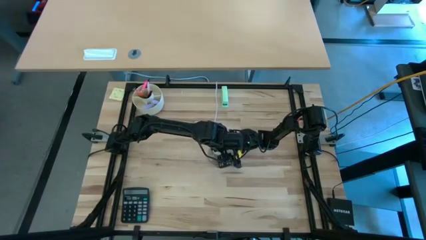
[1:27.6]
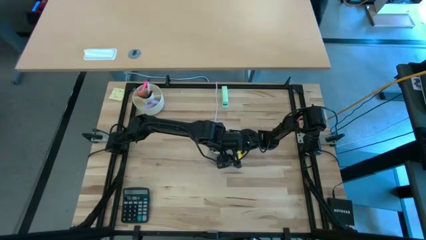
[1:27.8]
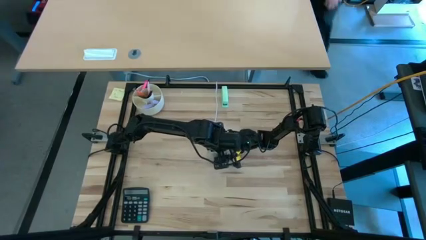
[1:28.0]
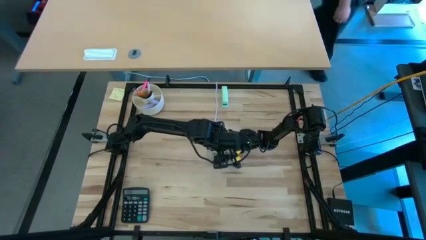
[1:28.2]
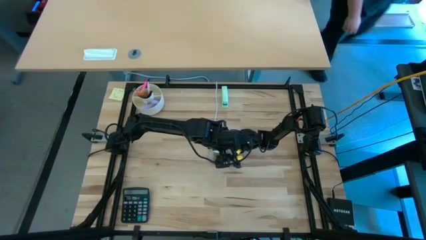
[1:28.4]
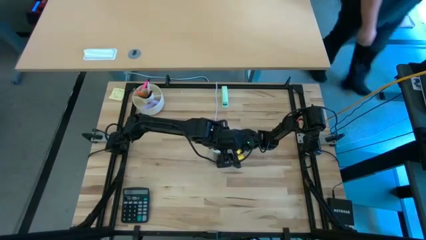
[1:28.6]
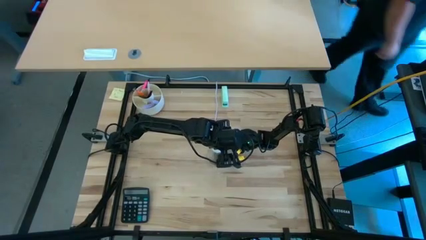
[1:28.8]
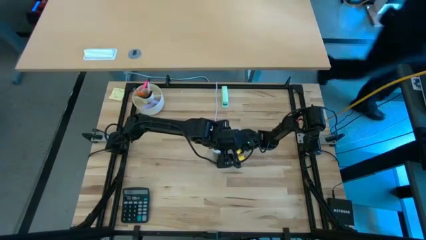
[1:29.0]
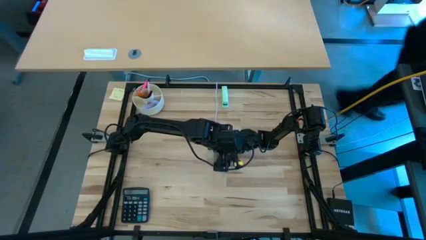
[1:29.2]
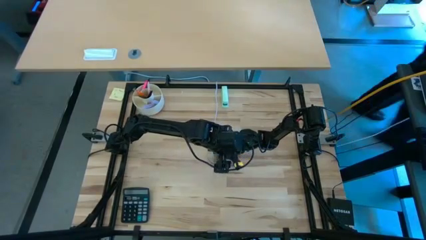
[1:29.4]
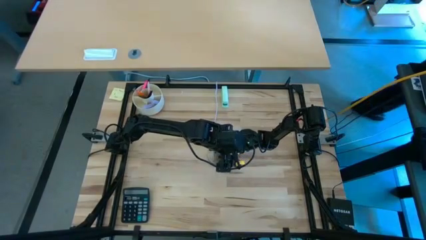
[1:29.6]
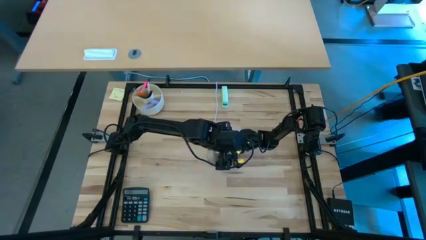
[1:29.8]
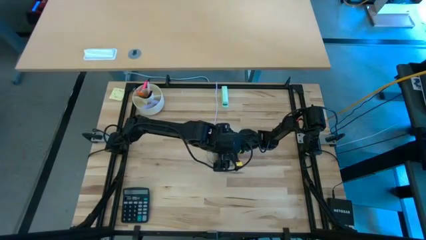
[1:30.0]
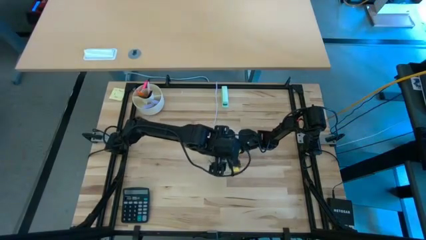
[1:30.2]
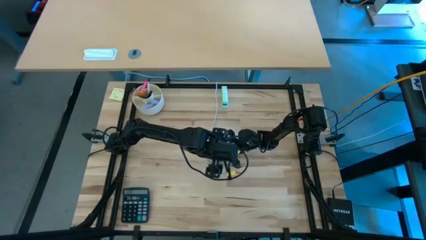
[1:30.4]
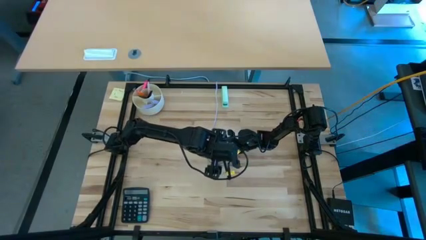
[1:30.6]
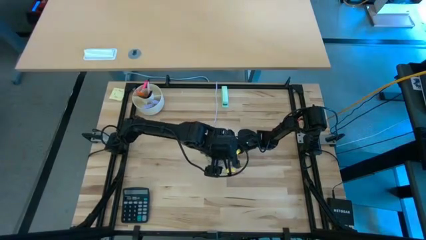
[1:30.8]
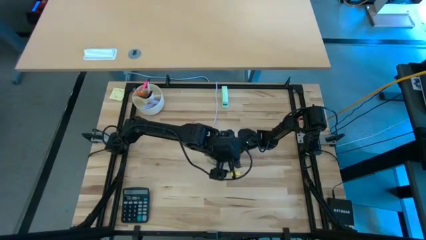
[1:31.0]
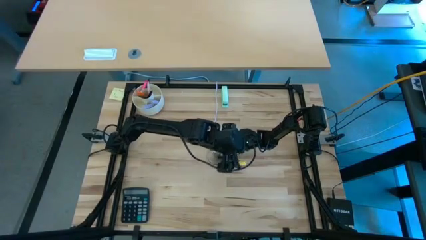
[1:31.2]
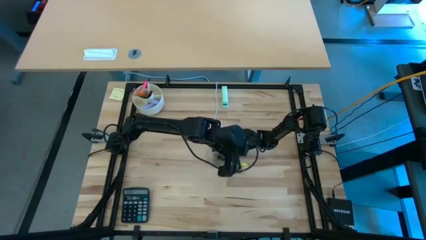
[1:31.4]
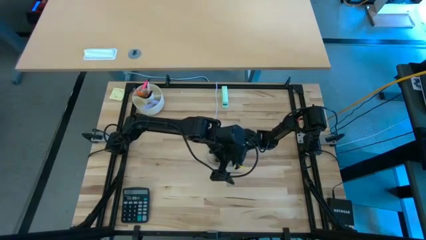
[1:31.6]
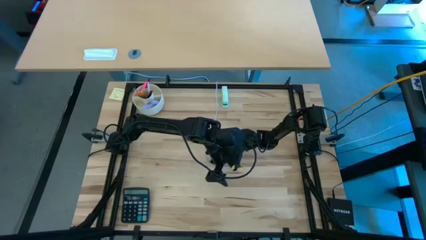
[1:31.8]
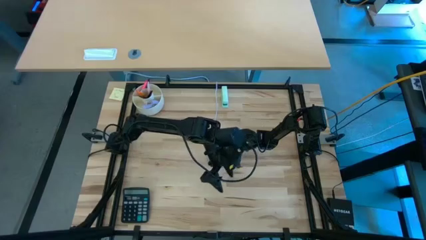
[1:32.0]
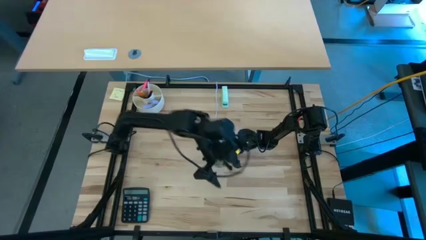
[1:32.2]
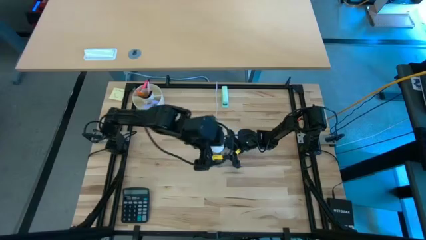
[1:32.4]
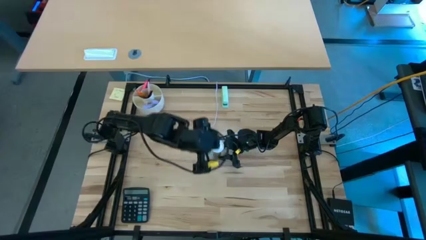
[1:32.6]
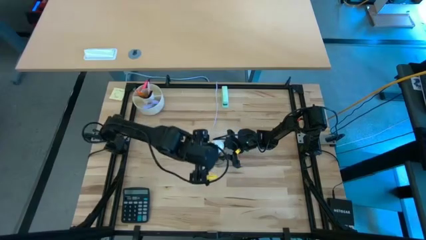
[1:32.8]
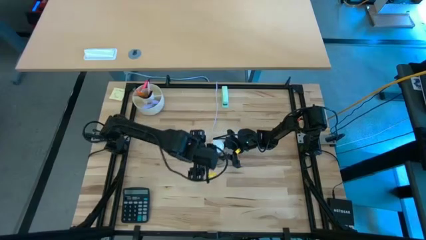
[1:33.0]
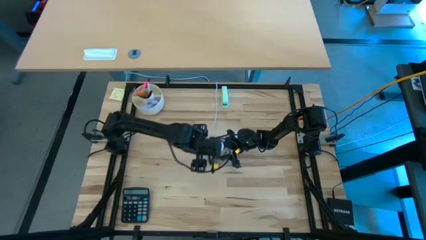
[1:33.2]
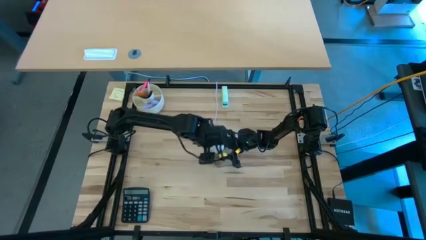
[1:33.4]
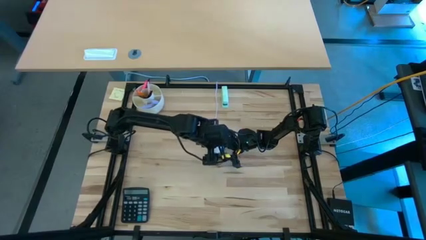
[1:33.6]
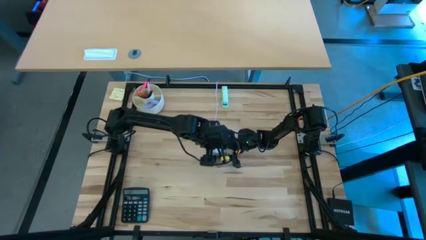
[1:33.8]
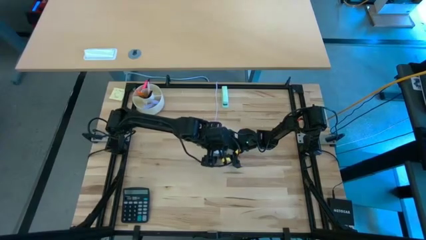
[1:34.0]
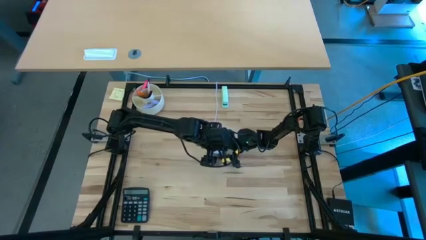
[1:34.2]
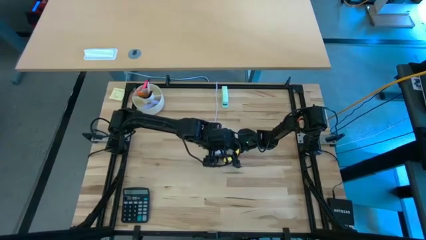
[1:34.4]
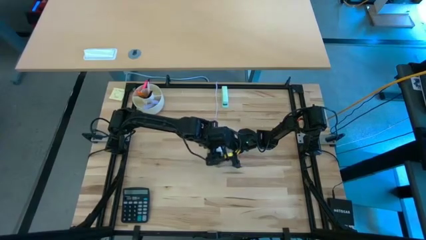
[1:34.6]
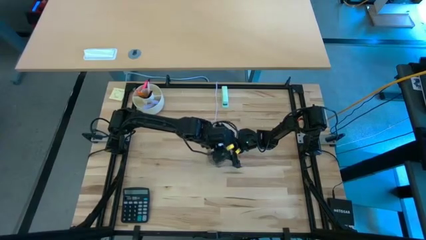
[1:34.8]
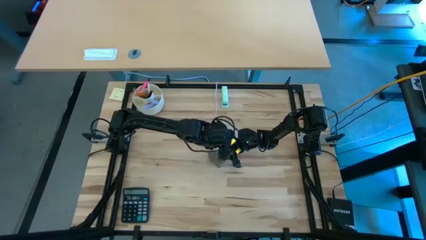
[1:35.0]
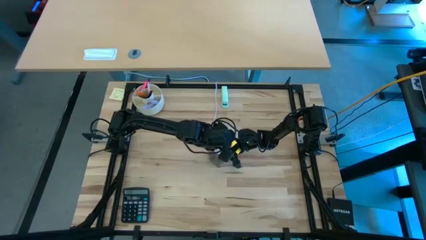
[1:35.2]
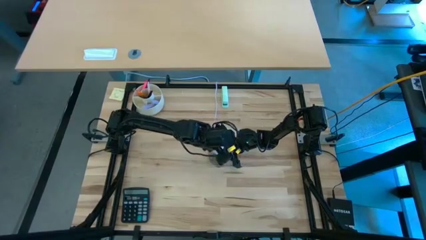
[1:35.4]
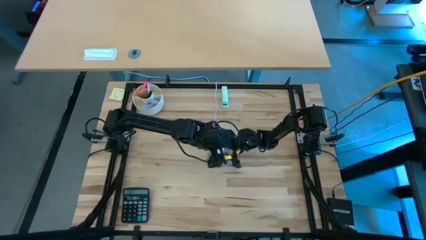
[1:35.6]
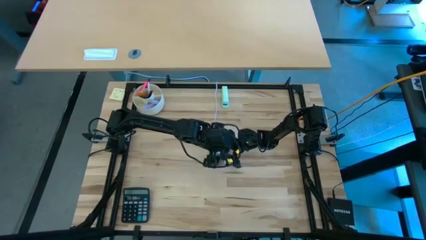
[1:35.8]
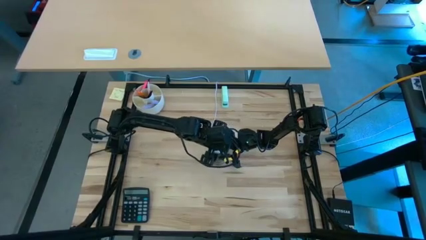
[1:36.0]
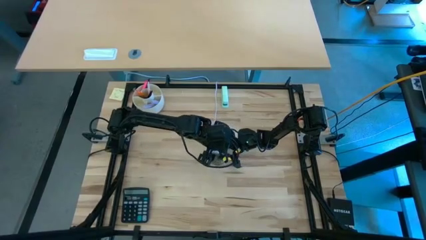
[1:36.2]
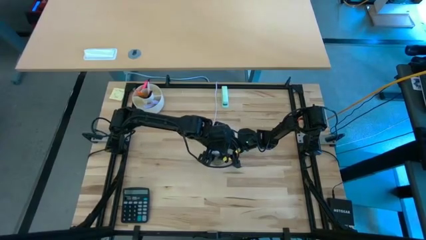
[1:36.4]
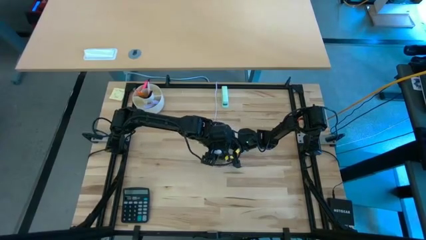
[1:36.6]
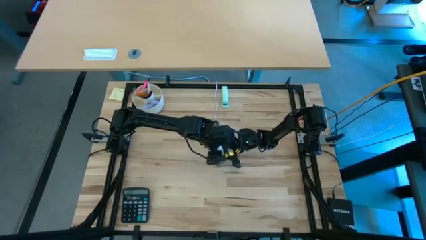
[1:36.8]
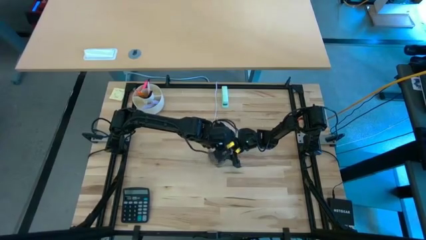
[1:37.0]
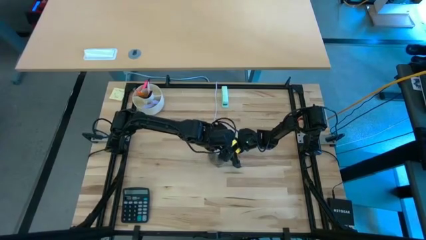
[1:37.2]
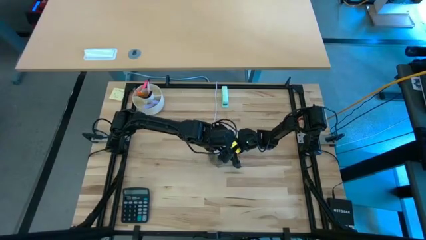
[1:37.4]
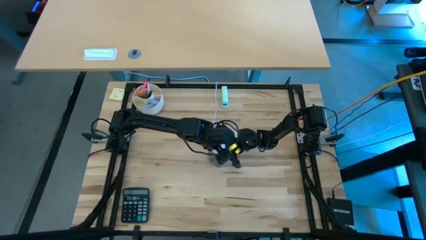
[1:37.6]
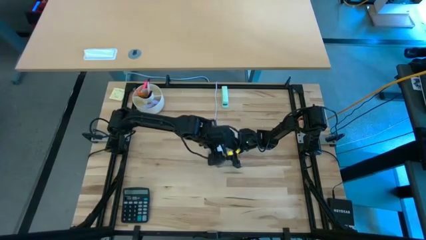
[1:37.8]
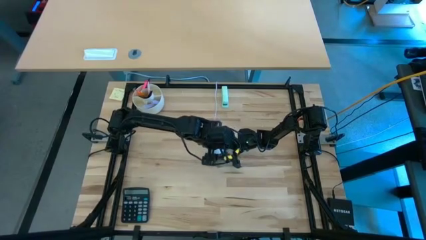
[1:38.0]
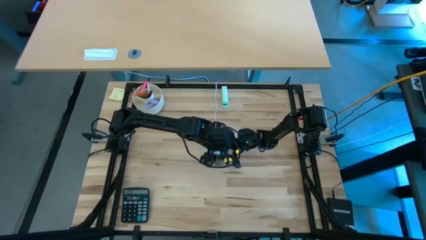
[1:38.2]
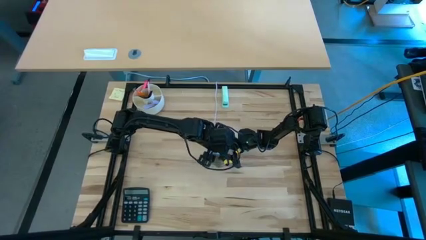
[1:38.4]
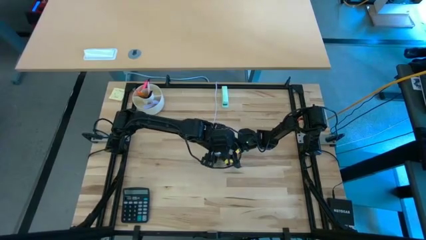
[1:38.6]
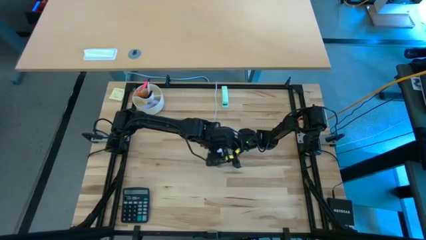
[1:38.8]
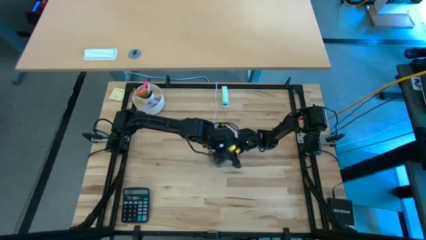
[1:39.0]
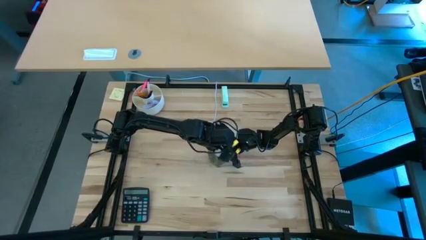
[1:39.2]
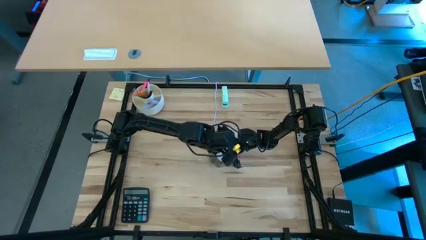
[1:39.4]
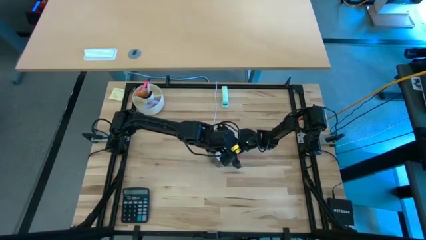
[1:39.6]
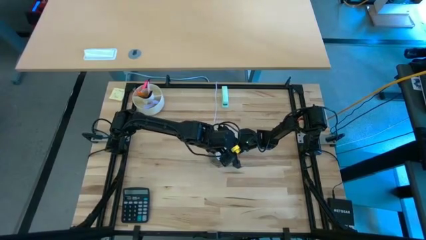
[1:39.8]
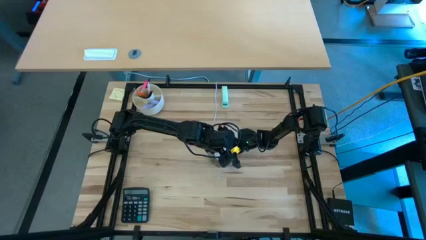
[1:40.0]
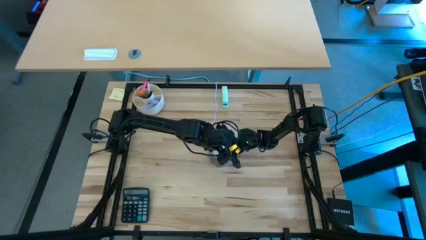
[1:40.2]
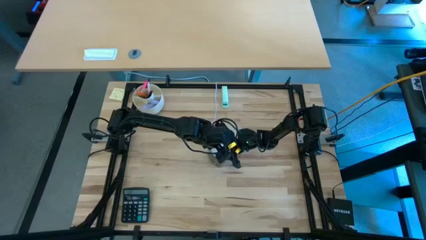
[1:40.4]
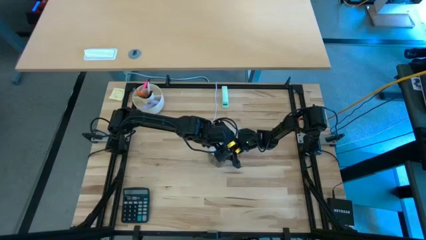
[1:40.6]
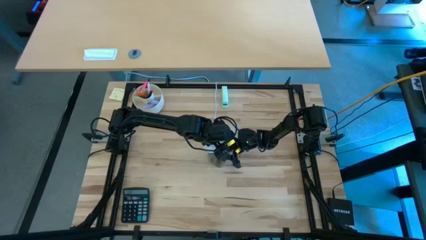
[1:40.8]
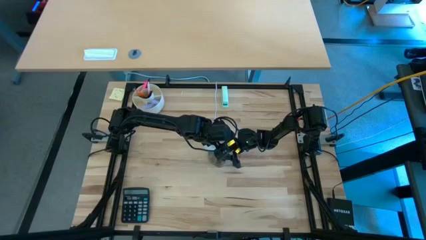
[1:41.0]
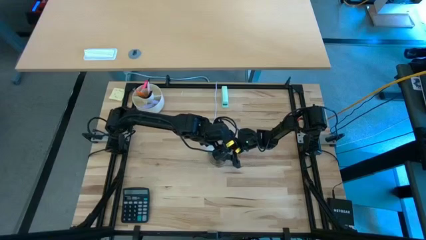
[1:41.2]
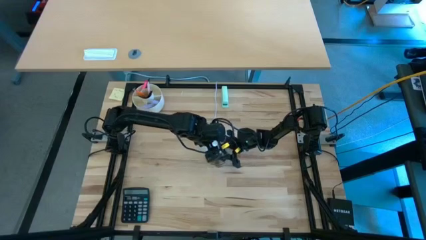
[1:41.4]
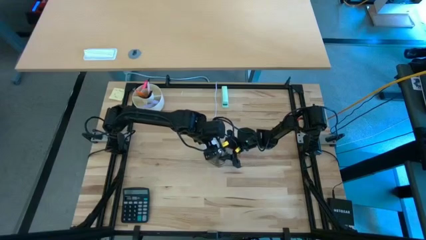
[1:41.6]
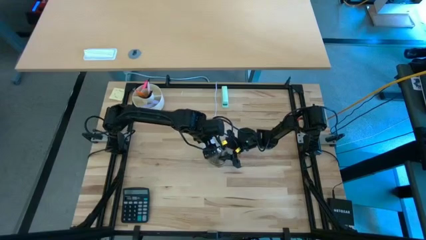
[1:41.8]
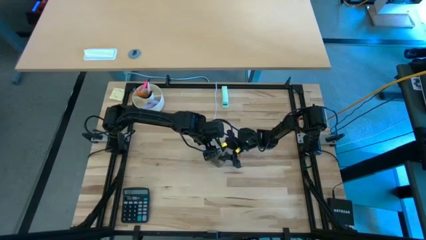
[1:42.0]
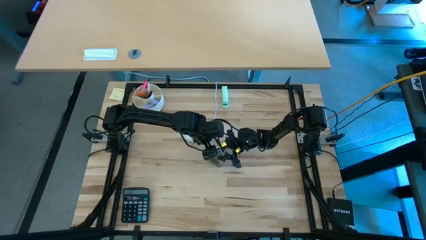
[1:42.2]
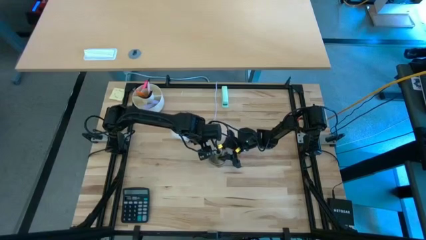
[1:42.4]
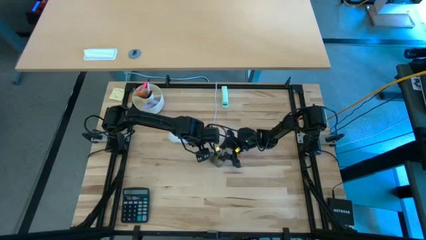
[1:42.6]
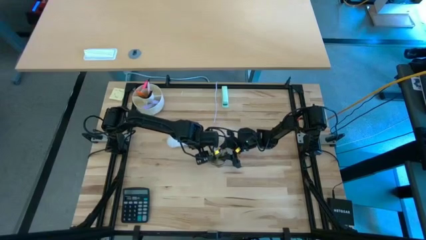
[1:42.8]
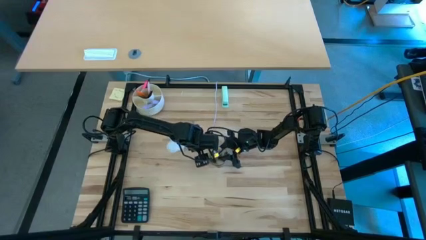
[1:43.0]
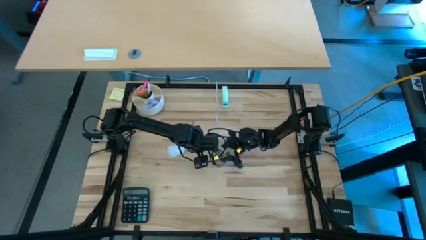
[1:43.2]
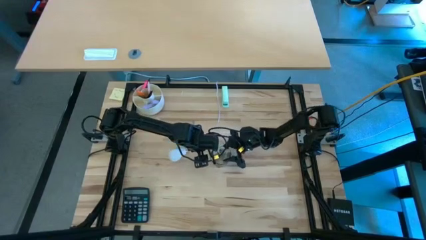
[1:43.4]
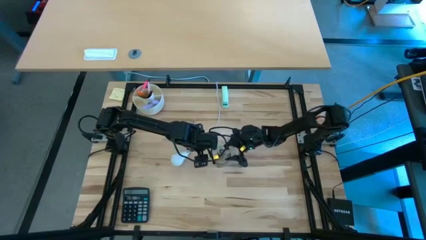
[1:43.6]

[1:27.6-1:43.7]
Task: Screw lightbulb
Remove the lightbulb from the lamp
